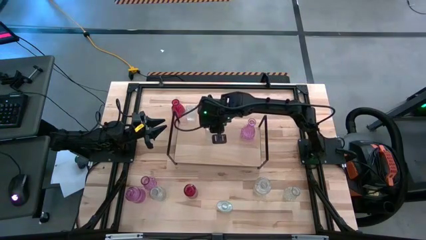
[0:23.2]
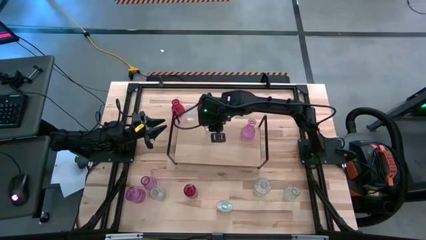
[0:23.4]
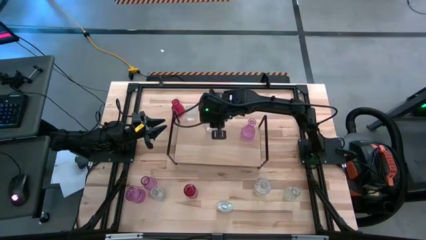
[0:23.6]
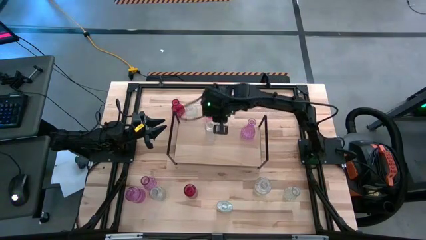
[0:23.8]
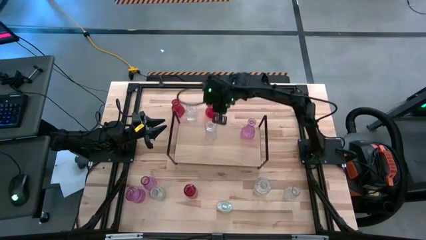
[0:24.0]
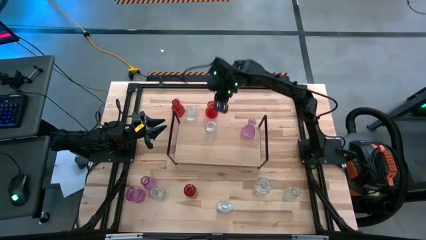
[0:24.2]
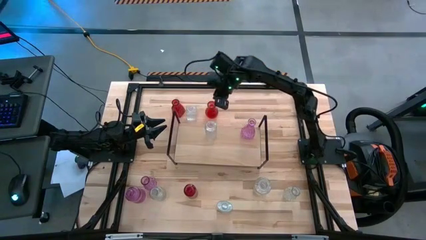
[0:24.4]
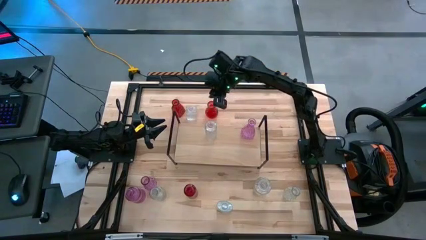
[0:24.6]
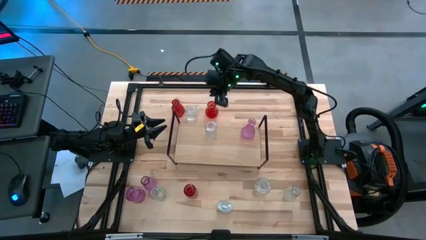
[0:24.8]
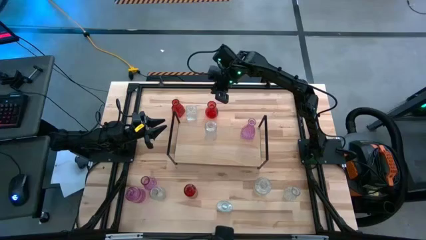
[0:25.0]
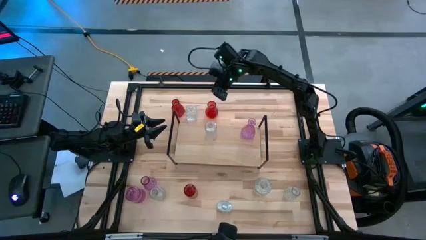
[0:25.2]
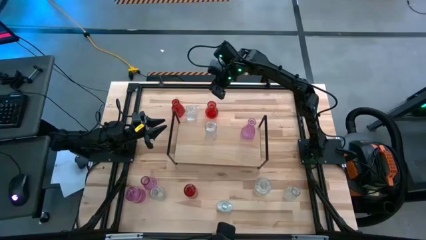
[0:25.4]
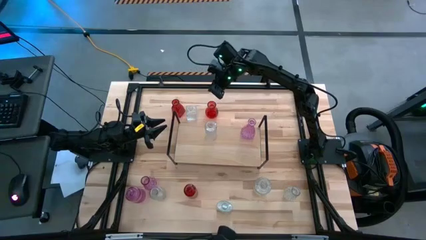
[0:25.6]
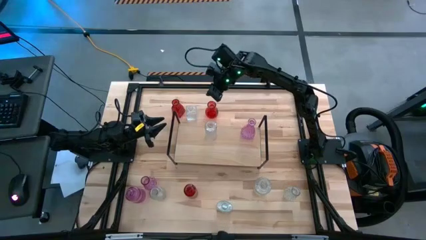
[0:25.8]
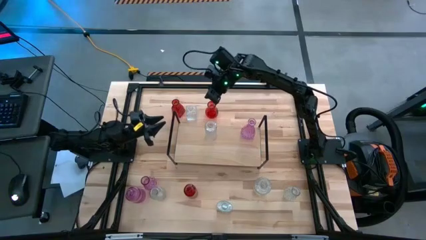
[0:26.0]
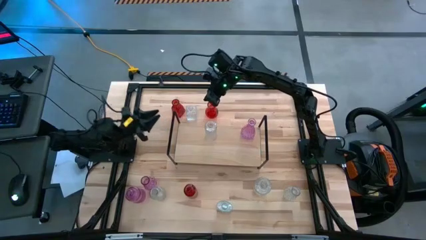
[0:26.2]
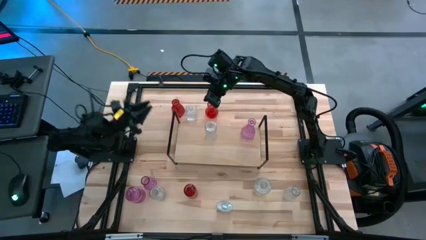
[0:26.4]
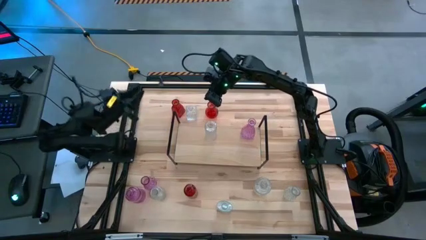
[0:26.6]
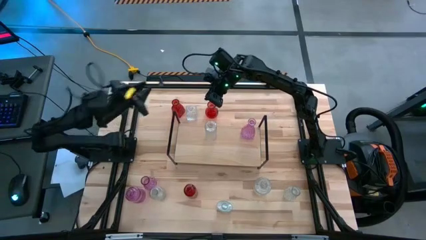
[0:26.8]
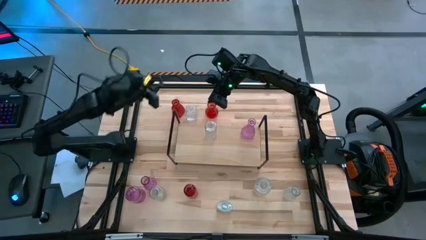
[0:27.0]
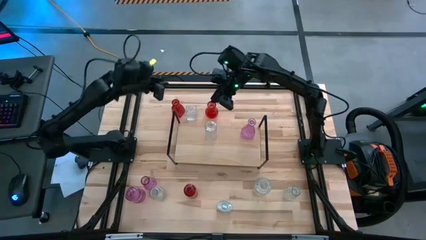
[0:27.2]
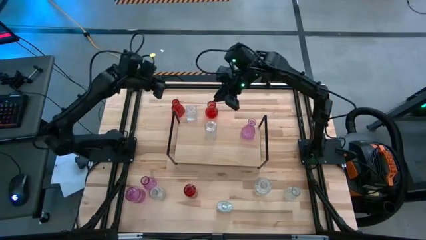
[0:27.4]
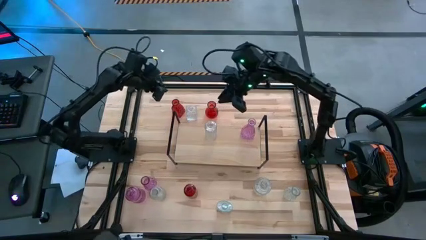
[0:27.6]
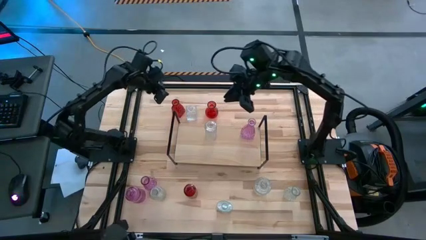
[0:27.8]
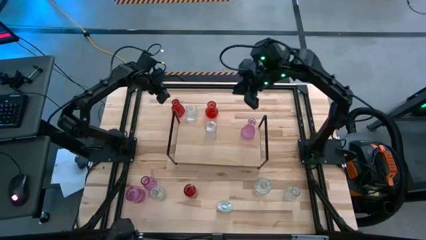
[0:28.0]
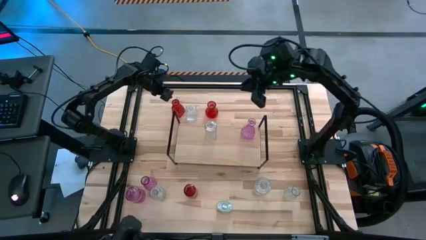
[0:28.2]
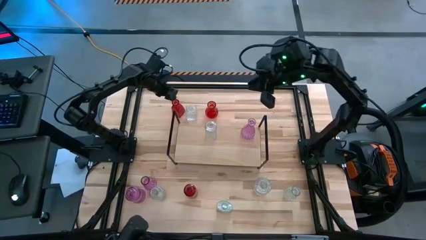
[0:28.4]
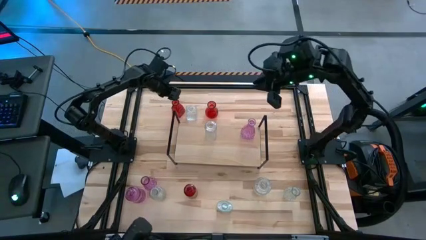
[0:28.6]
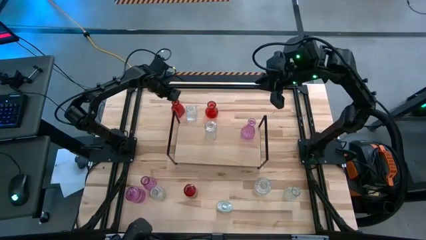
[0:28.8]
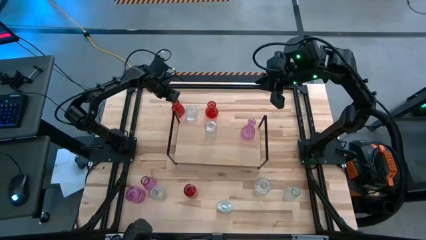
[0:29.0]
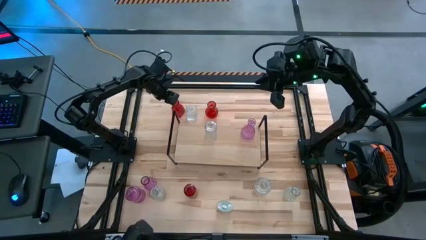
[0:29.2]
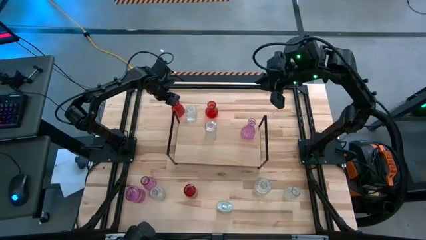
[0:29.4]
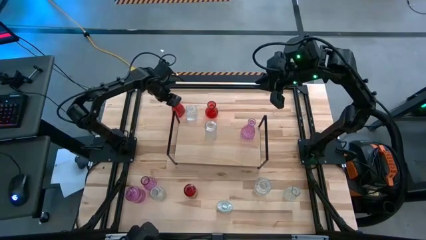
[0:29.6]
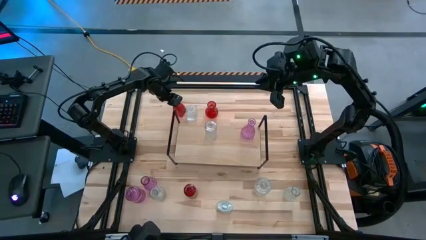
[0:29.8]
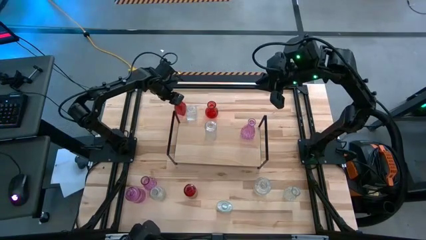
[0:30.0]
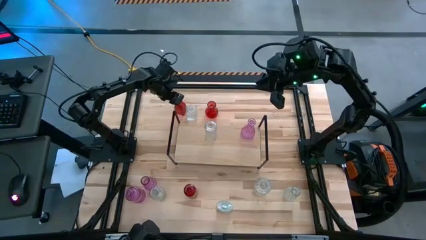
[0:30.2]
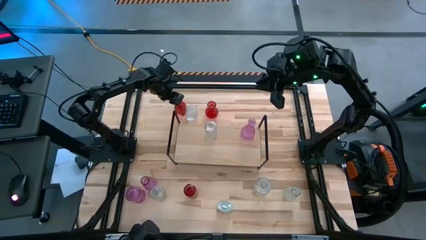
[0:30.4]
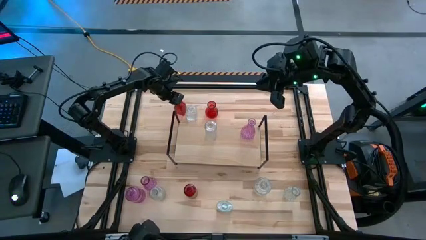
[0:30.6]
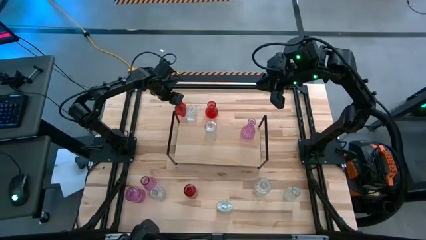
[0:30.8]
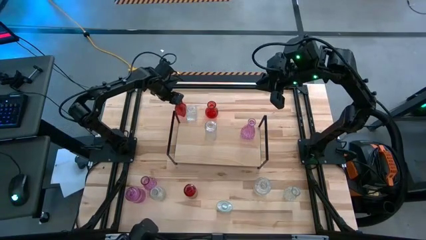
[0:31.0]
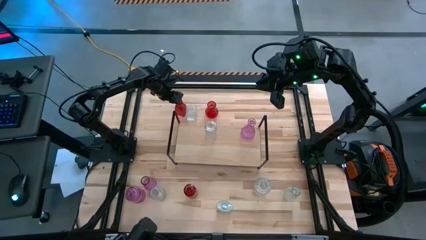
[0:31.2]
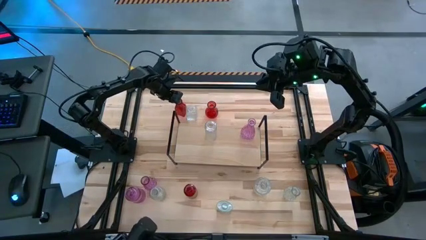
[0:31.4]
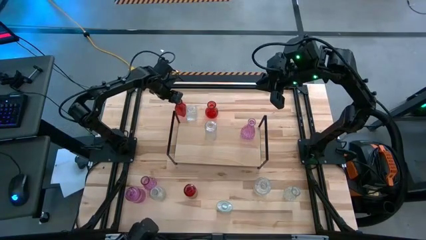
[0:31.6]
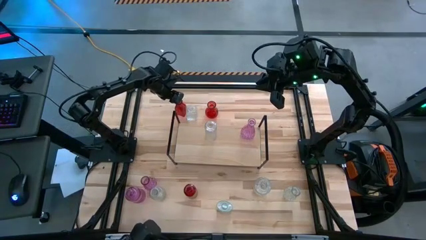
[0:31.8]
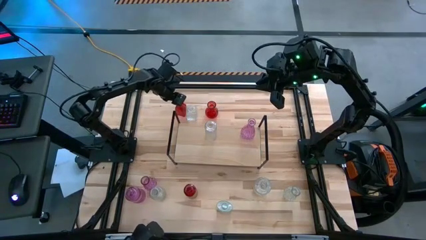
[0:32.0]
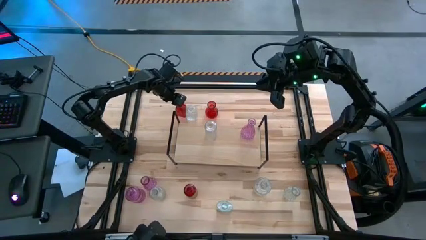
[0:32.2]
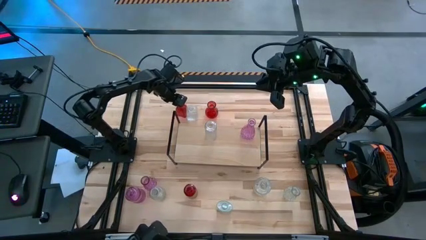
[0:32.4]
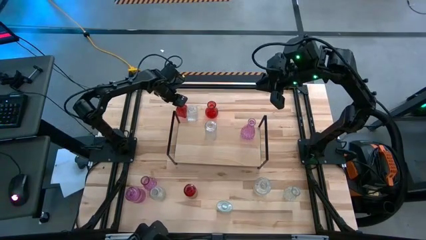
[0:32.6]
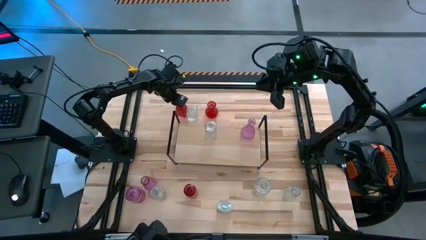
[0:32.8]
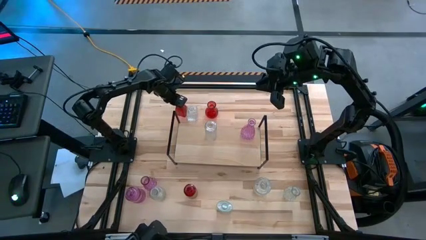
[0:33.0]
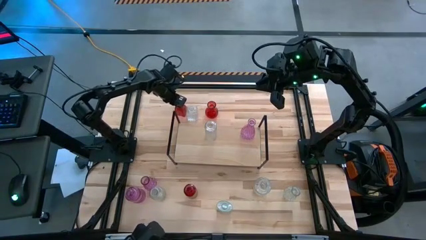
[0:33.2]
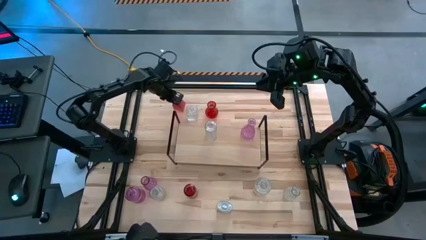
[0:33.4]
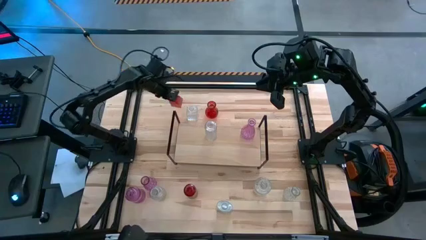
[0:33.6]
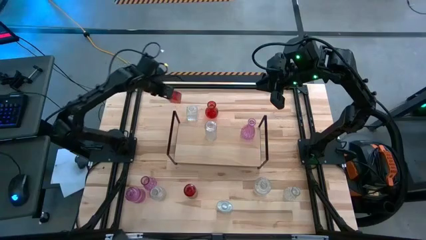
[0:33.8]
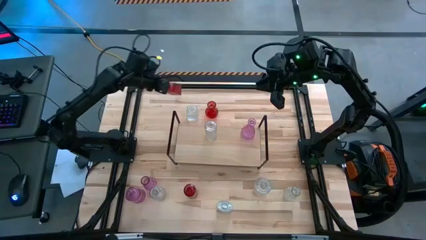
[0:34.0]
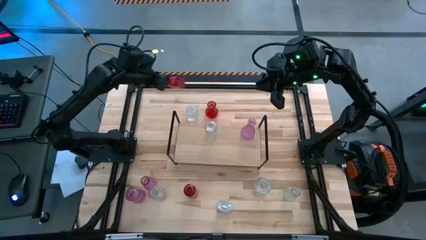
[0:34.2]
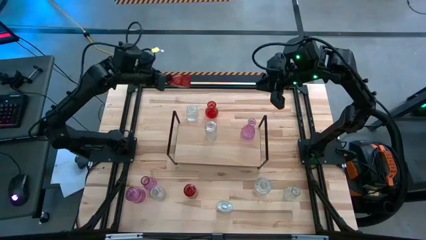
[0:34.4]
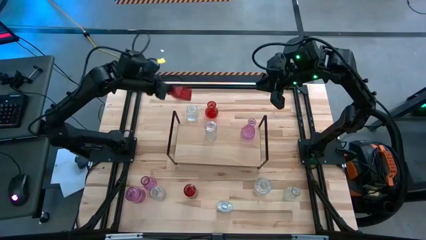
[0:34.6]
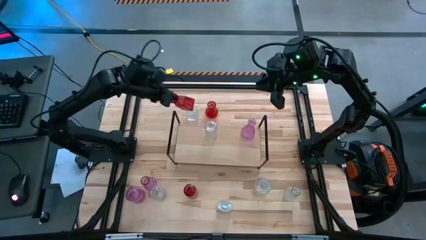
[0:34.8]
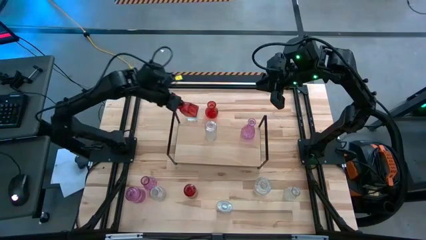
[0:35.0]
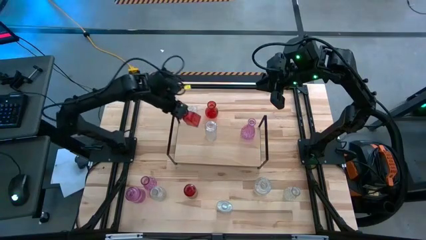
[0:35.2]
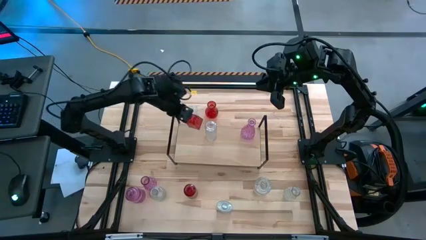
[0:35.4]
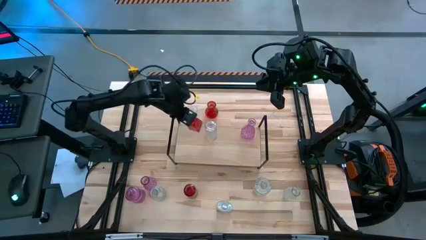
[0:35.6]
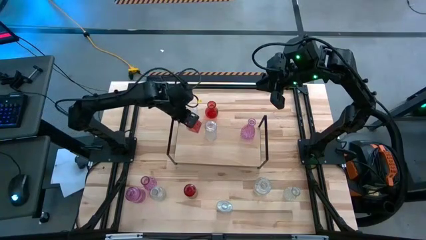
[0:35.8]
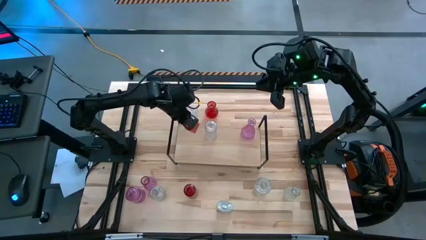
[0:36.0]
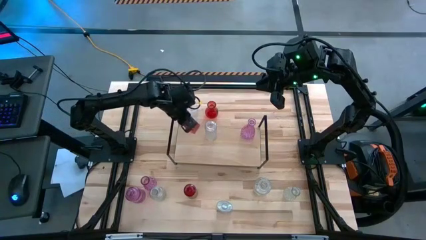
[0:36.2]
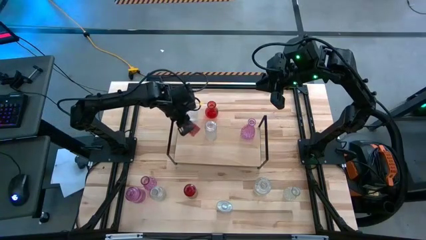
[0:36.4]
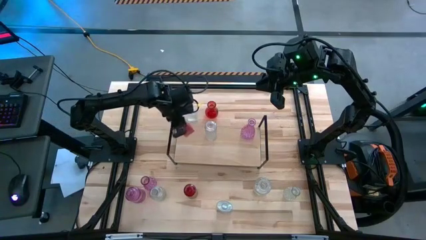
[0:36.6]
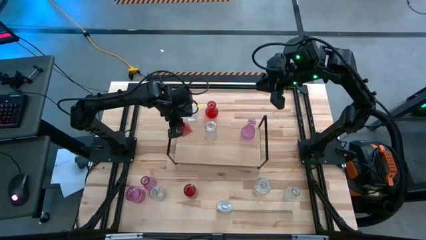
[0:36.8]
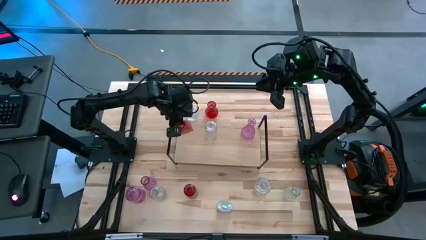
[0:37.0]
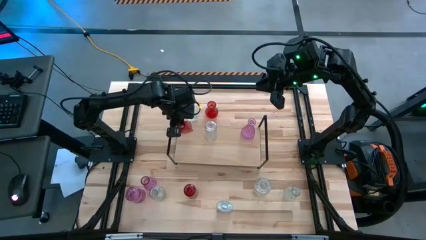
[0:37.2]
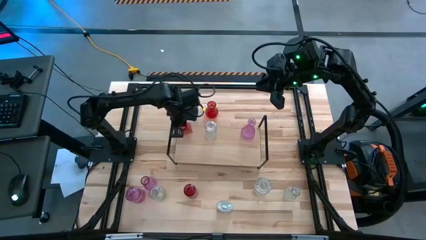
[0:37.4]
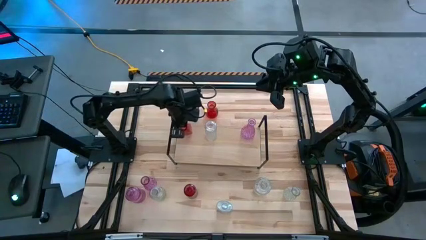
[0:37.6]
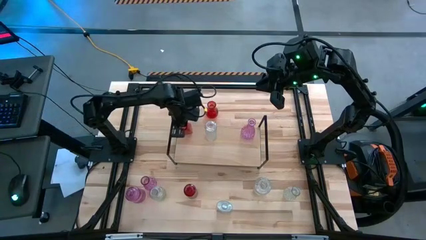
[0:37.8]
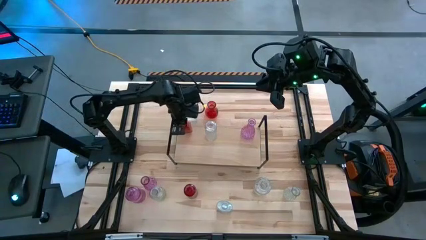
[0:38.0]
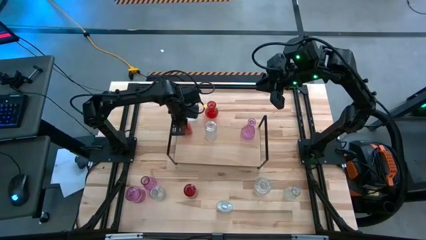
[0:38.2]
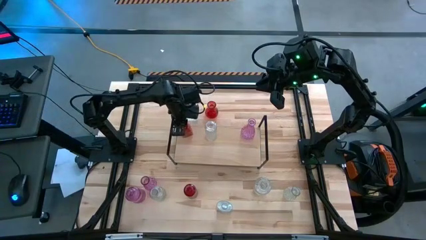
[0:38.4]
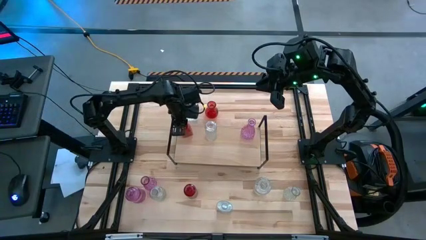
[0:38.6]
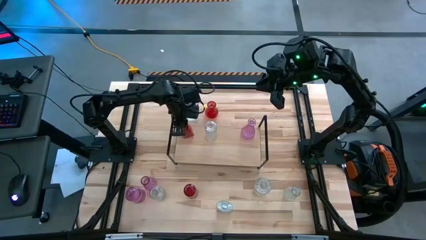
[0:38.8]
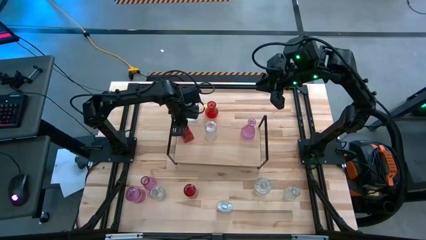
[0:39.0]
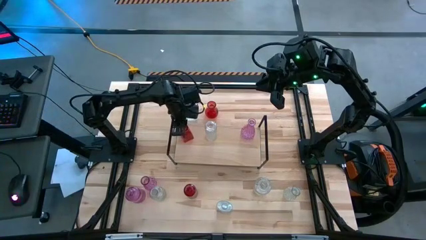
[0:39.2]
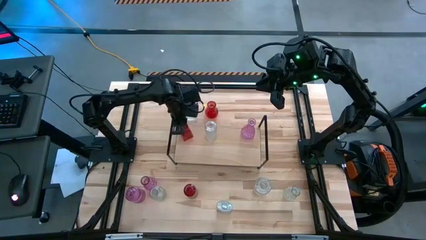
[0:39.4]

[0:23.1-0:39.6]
Task: sort vases onto shelf
Put the red vase on the shelf
